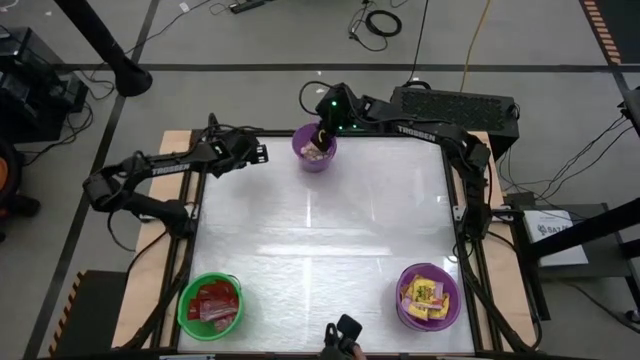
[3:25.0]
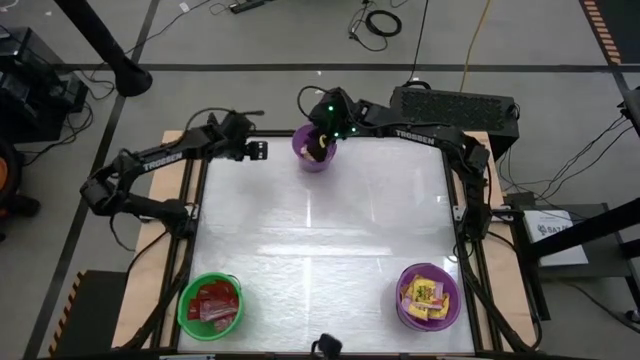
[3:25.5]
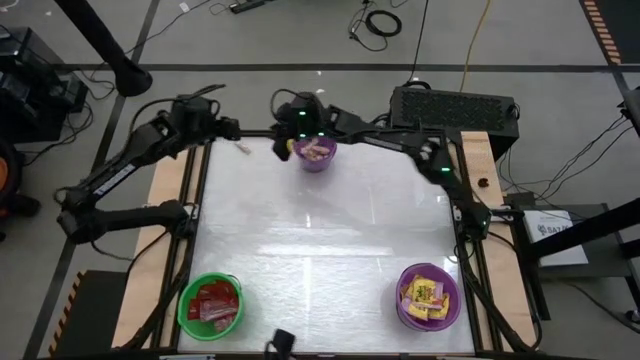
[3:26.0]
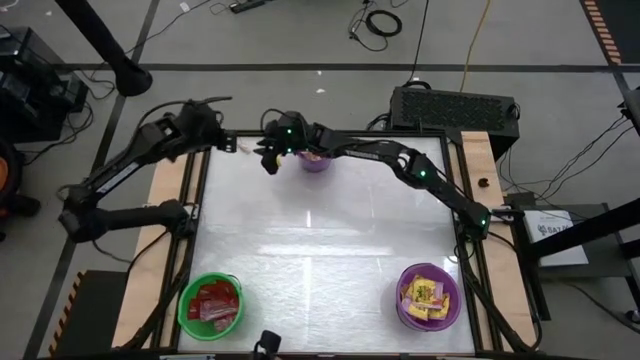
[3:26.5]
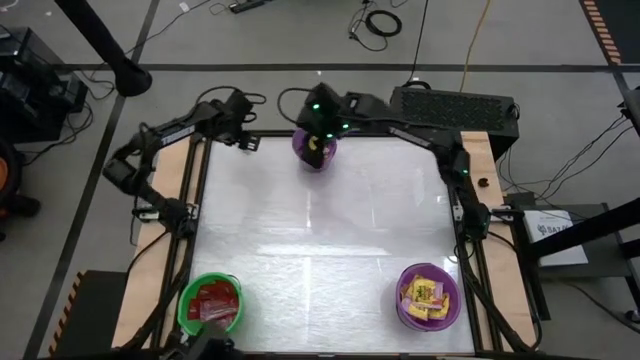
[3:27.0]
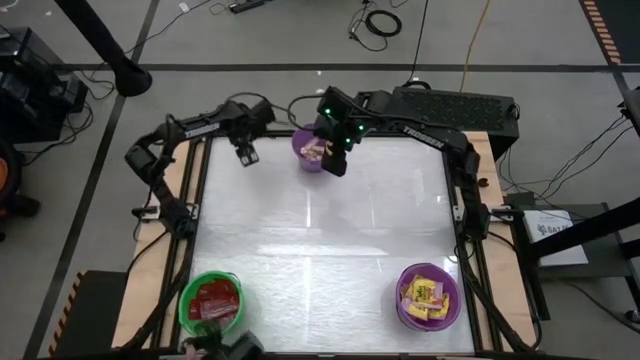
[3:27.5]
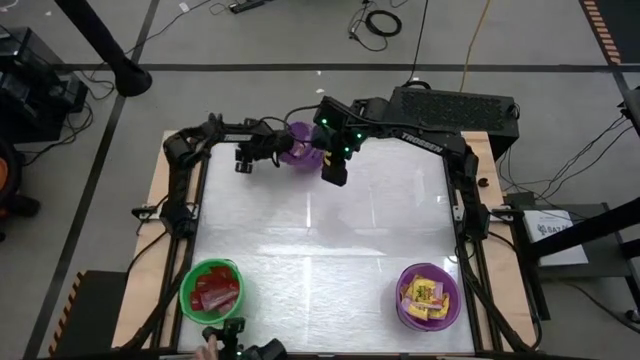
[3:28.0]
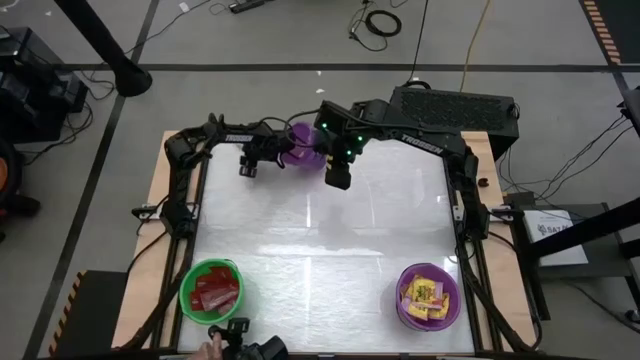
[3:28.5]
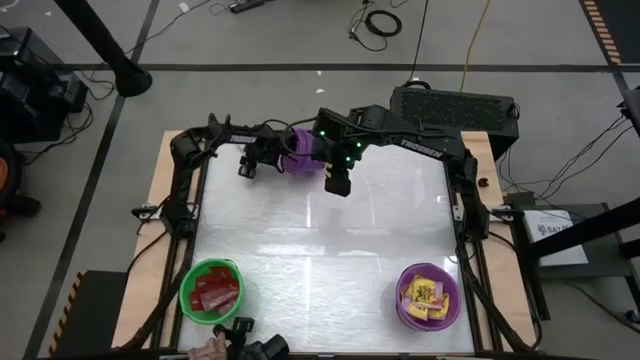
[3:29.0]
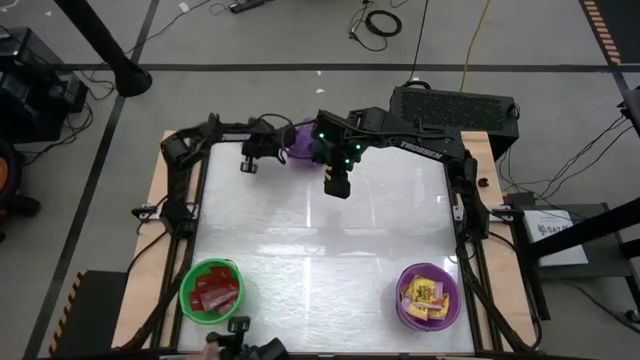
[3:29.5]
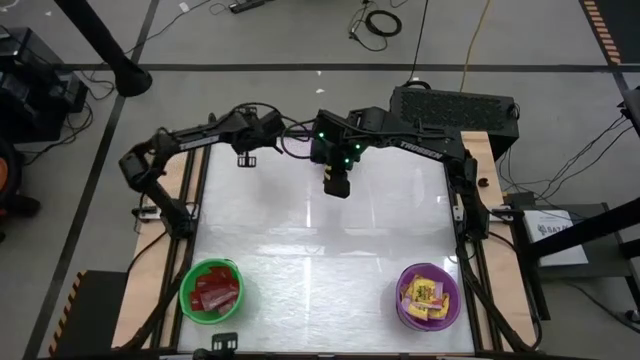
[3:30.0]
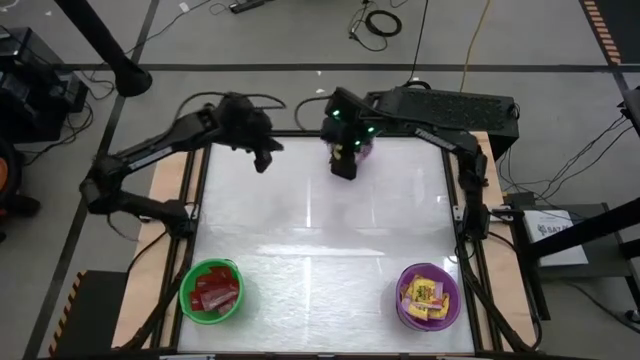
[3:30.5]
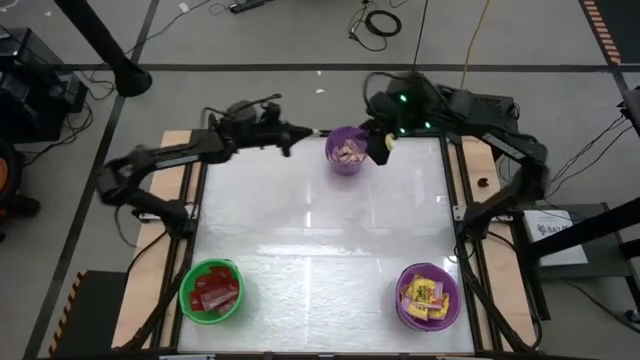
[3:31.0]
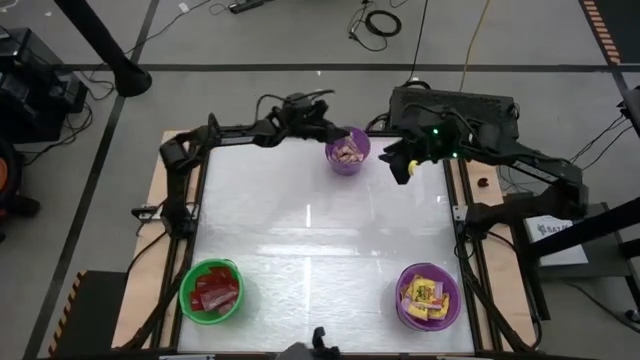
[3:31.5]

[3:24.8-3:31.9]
Task: Sort candy by brand, put in halloween buckets
Put the white chocolate into the top purple bucket

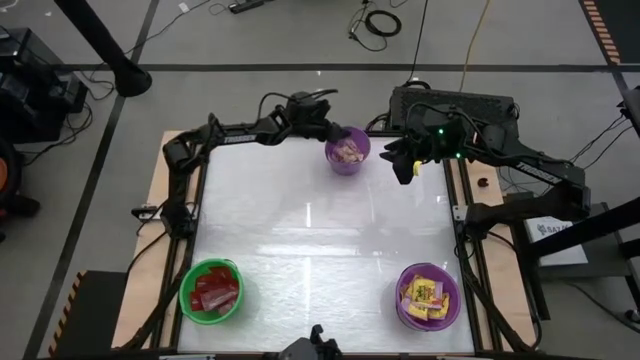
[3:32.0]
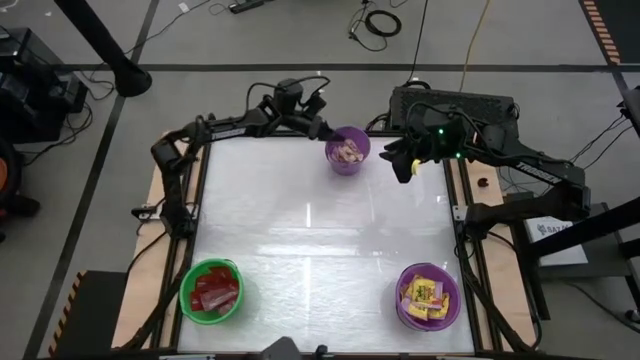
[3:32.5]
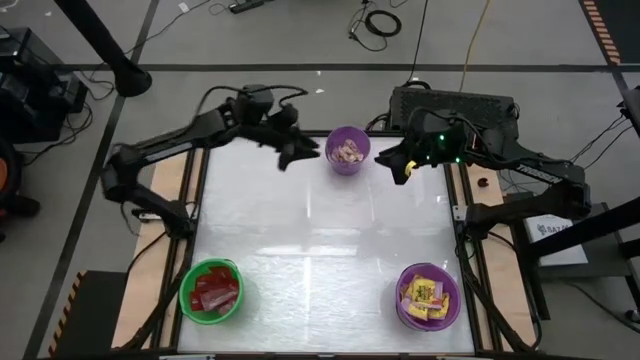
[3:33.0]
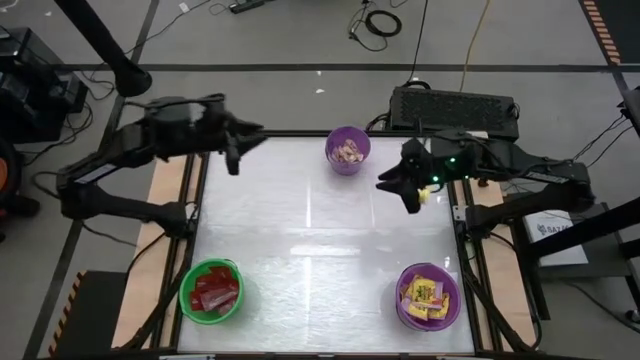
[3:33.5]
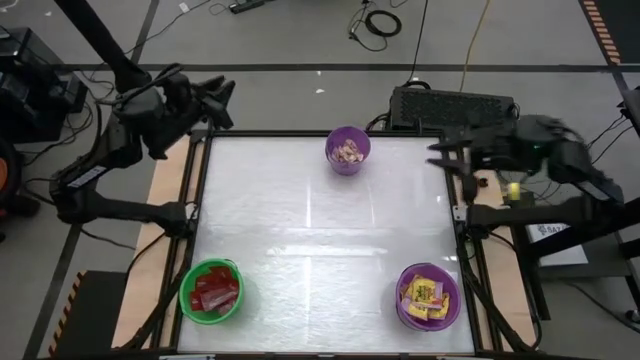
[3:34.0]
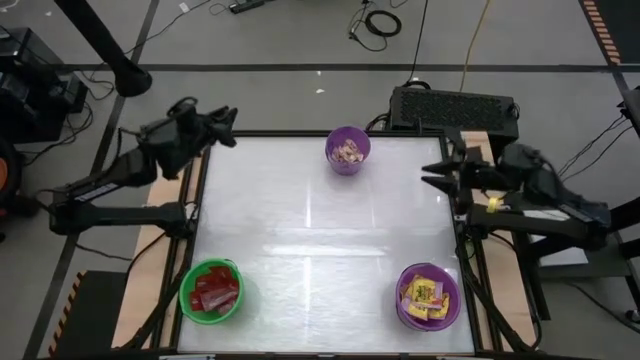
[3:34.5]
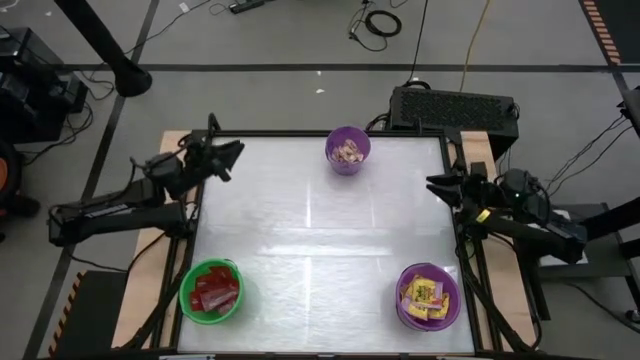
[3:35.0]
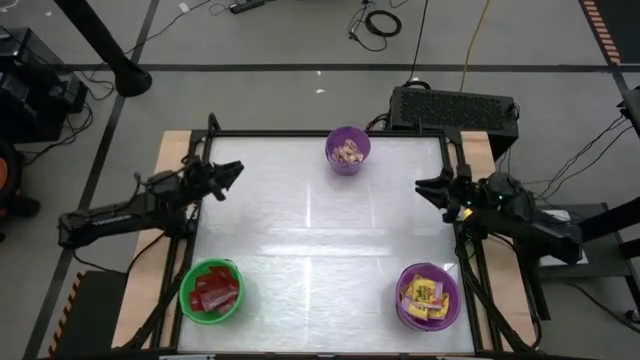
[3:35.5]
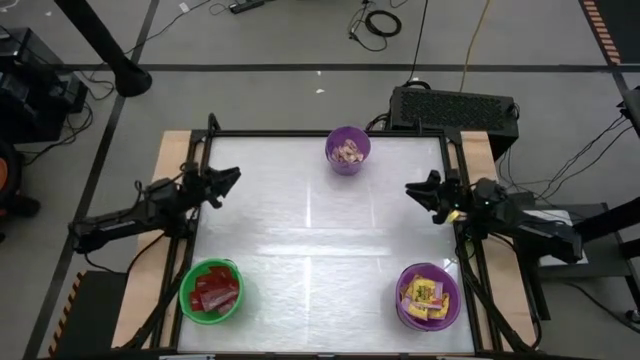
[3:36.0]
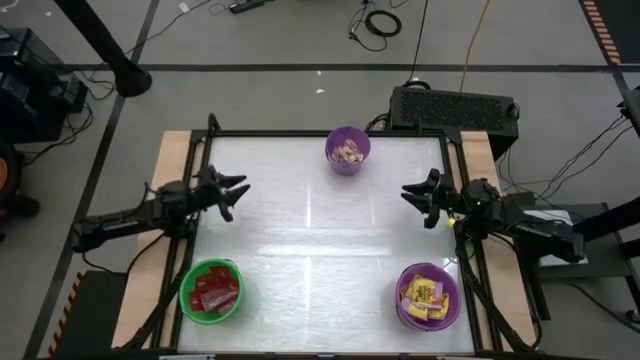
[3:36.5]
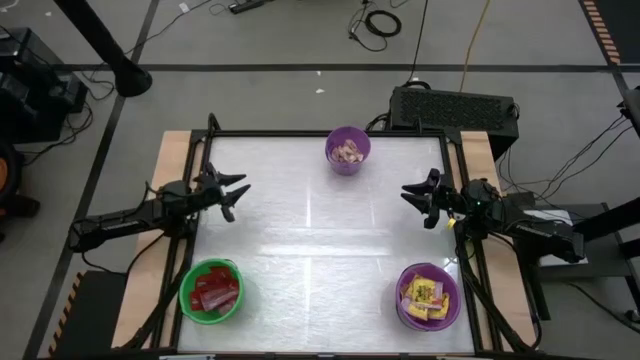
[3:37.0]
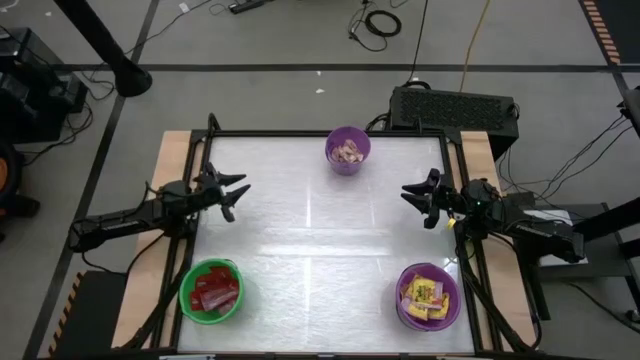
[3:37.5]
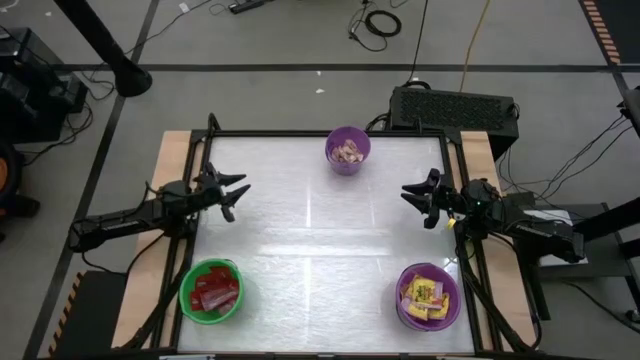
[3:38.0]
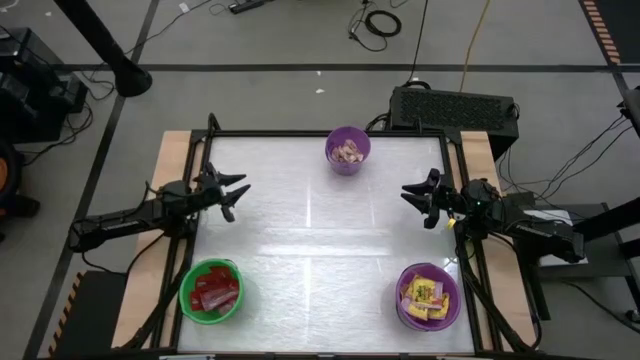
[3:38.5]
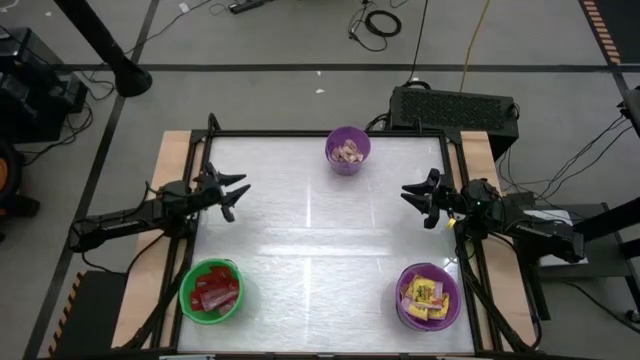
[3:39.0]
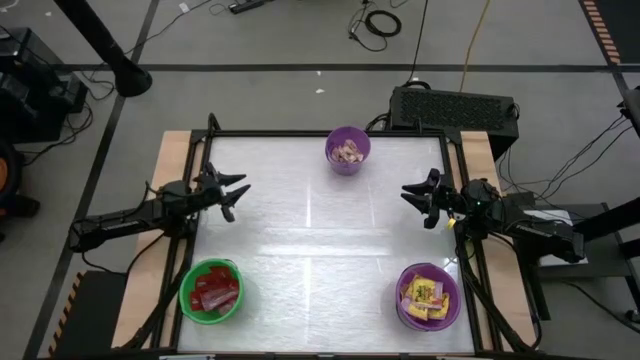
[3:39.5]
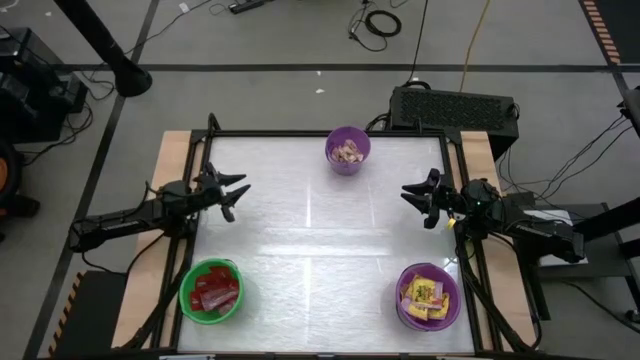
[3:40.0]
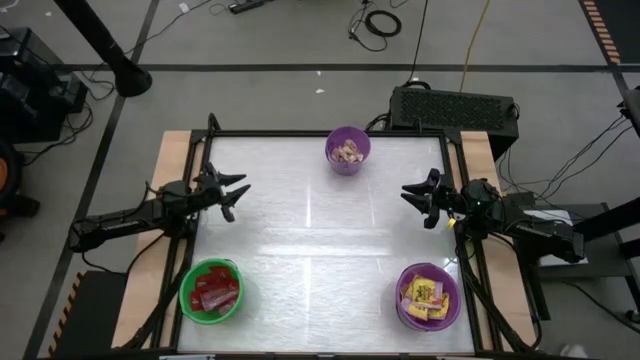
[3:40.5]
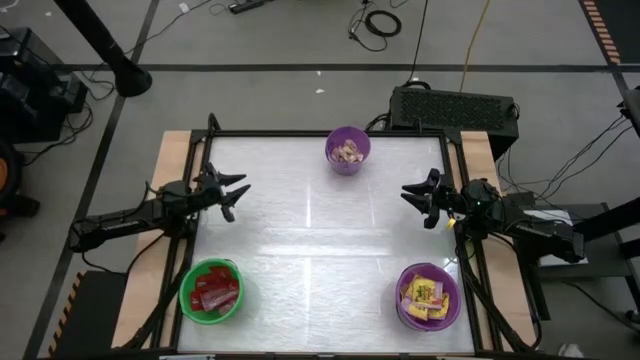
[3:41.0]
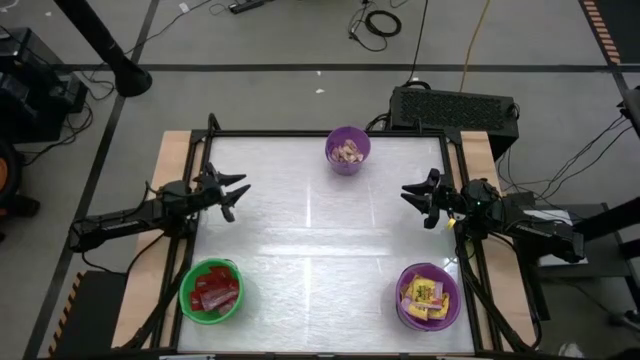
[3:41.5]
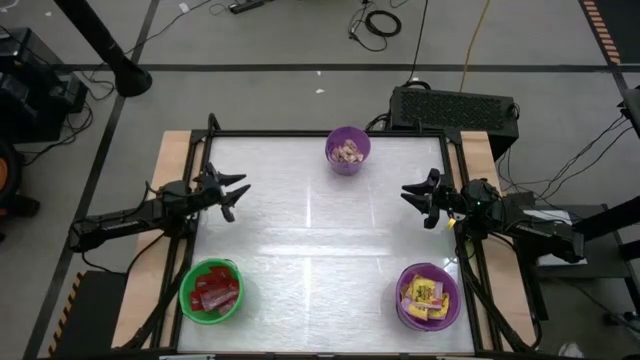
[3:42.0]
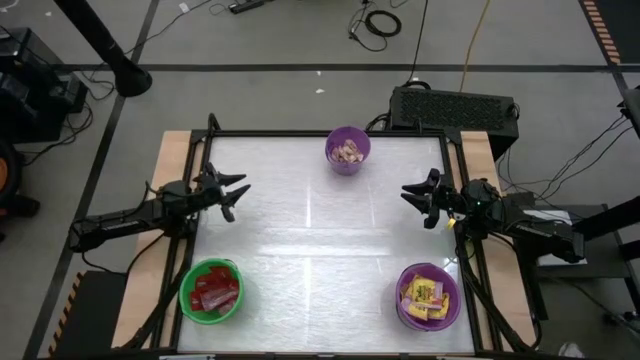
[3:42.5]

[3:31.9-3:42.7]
Return to Home Position

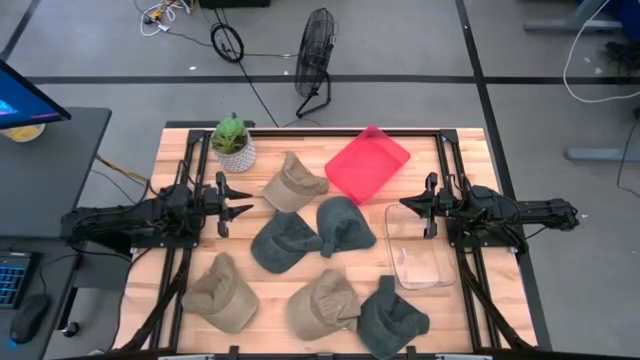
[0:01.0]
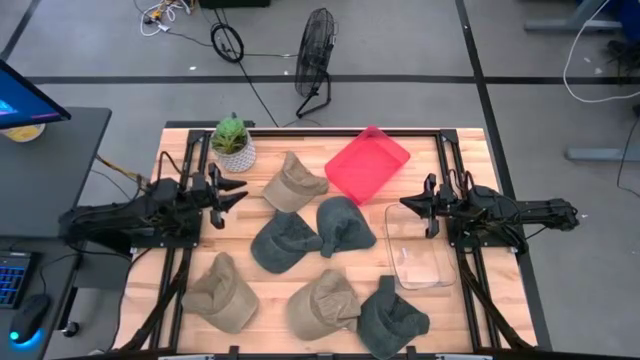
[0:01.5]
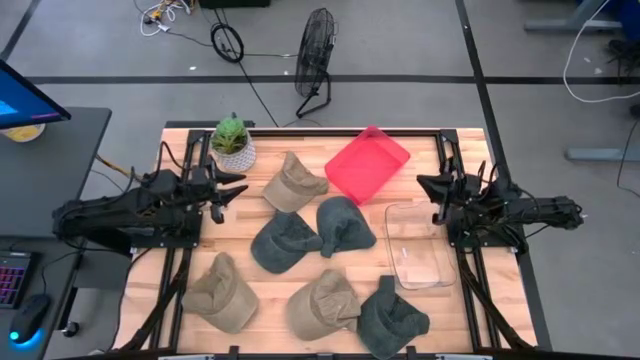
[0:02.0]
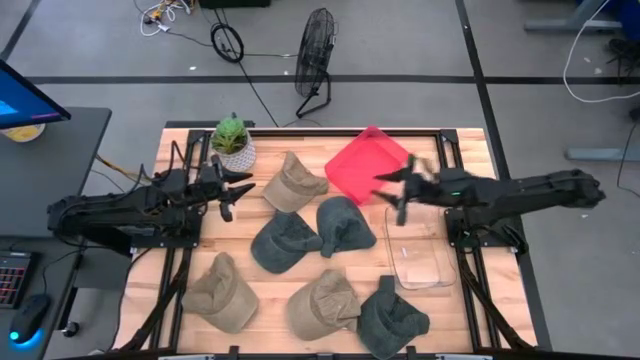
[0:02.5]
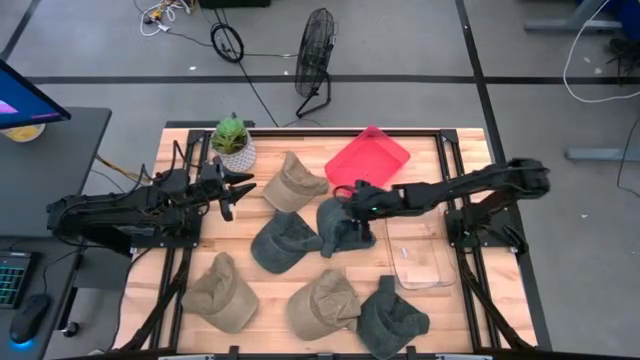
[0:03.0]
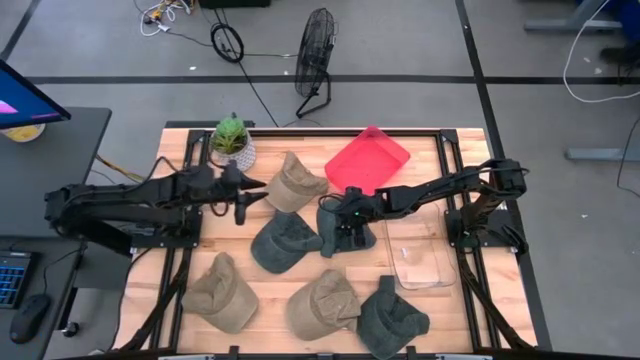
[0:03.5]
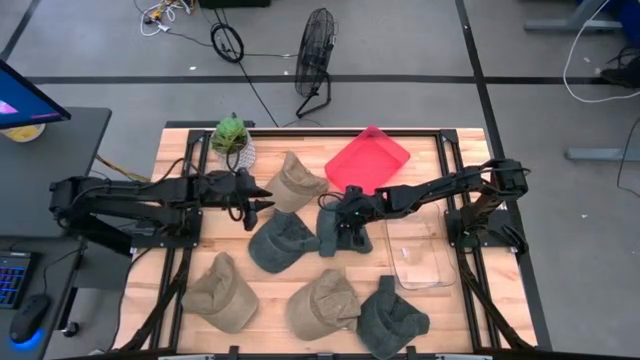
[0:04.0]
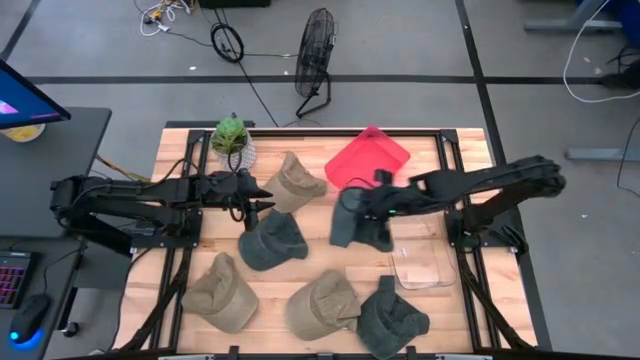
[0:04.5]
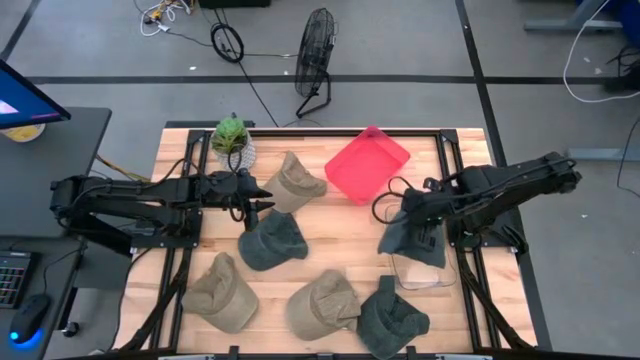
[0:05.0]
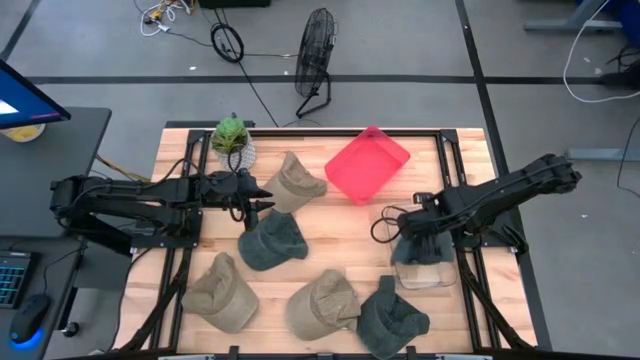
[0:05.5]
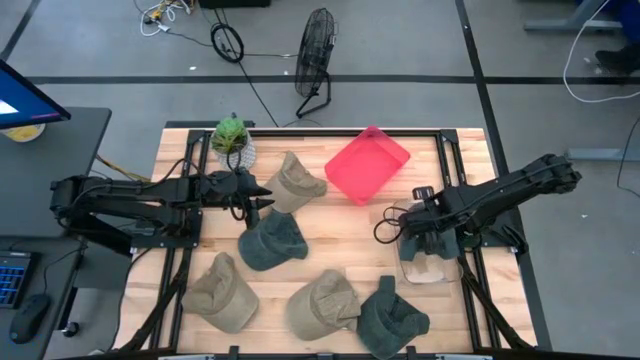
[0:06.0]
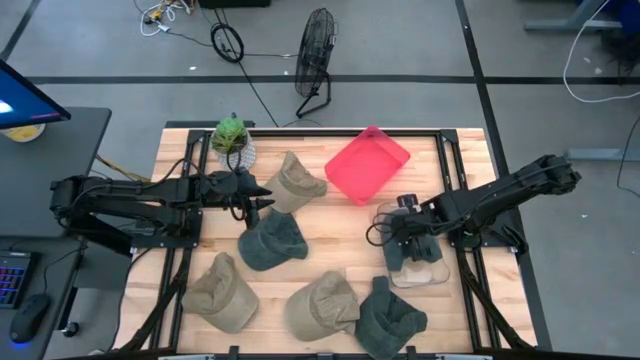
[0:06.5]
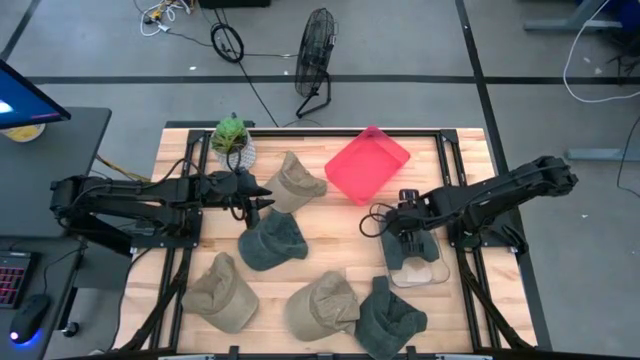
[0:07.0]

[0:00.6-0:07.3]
Task: Pick & Place hat
Put the top right gray cap into the transparent bin
